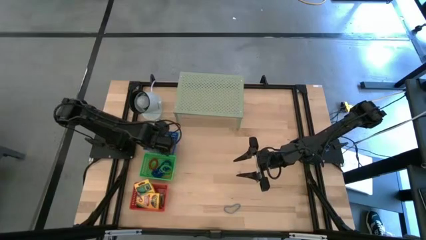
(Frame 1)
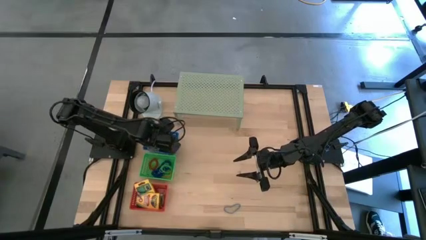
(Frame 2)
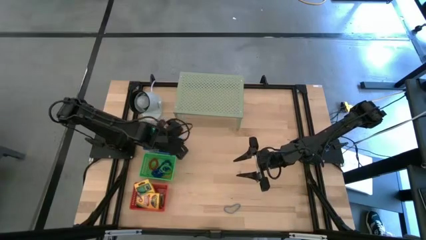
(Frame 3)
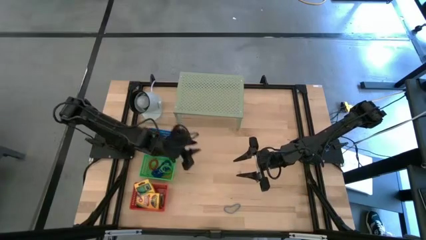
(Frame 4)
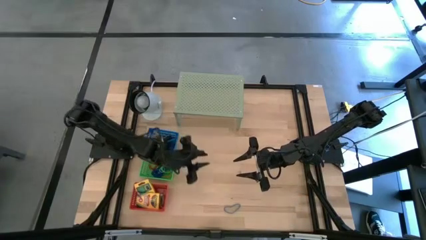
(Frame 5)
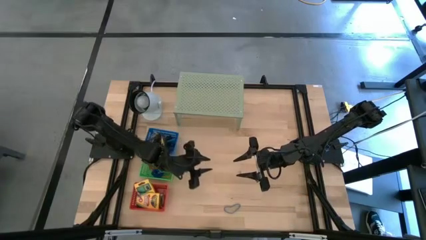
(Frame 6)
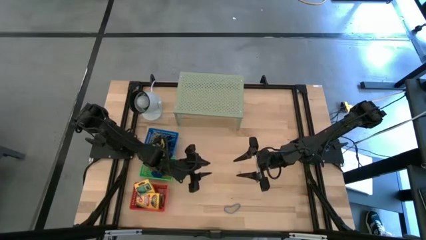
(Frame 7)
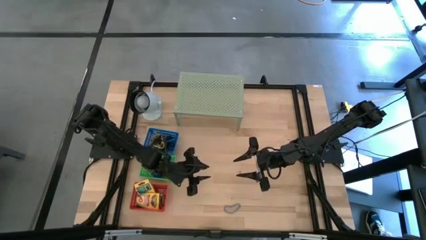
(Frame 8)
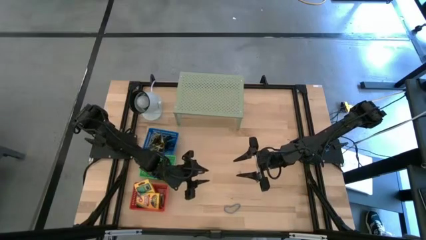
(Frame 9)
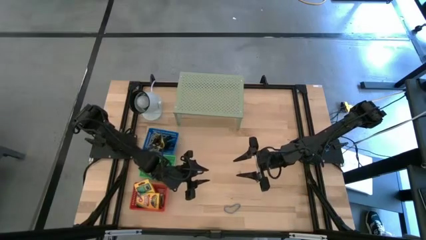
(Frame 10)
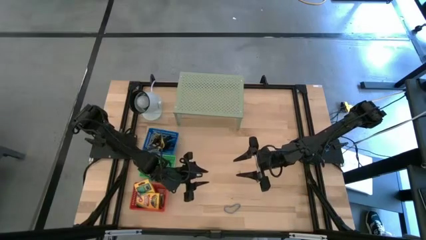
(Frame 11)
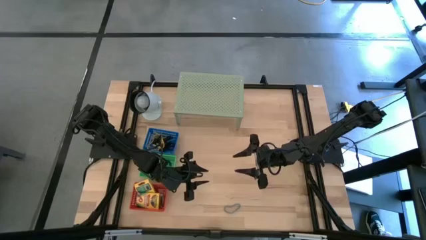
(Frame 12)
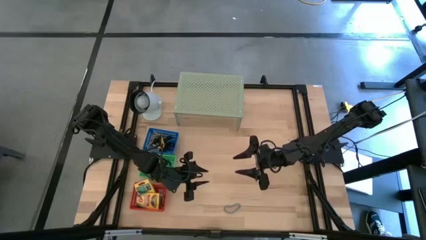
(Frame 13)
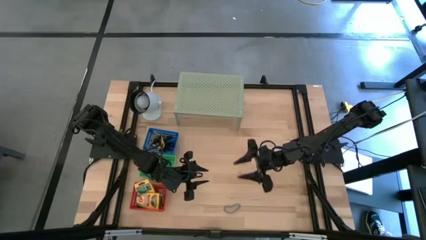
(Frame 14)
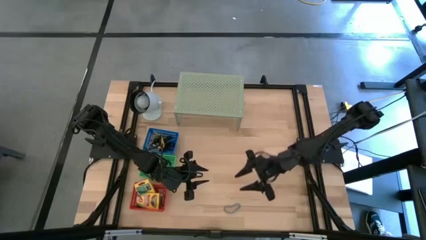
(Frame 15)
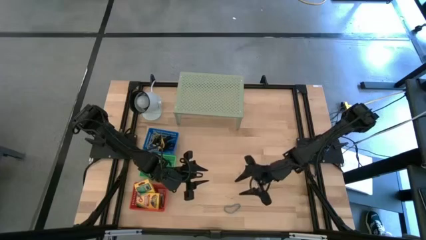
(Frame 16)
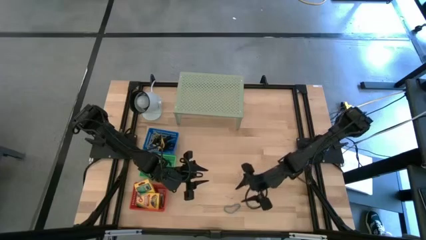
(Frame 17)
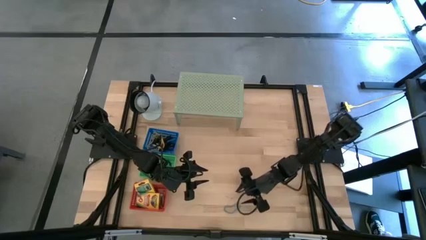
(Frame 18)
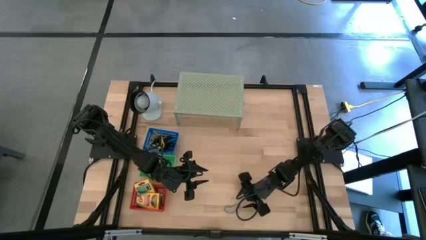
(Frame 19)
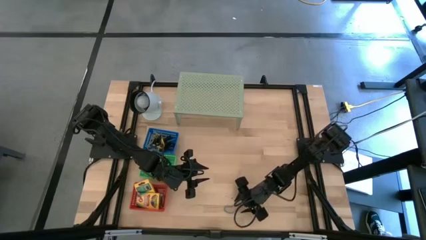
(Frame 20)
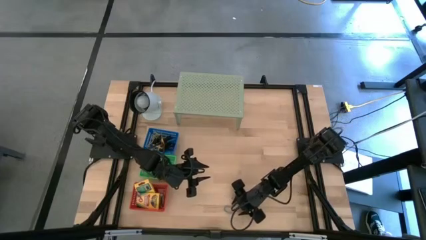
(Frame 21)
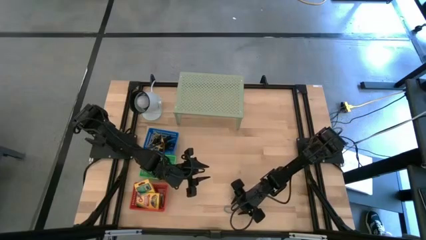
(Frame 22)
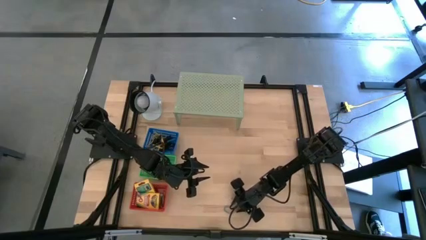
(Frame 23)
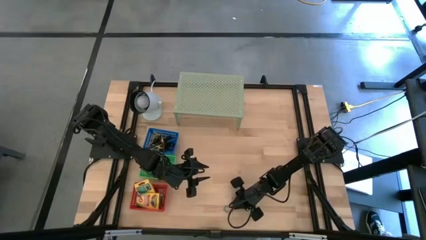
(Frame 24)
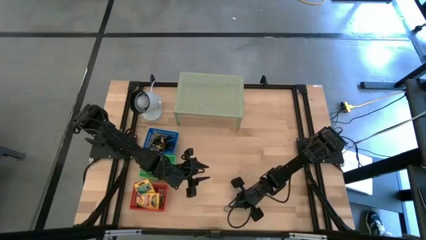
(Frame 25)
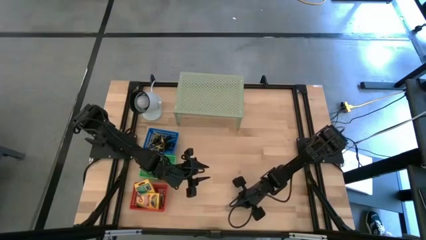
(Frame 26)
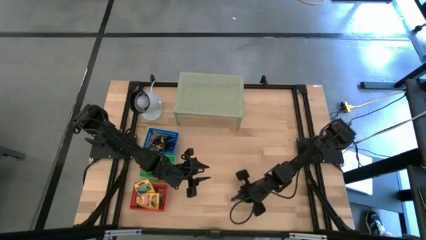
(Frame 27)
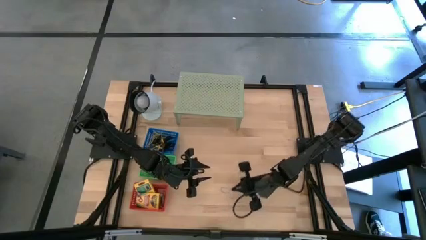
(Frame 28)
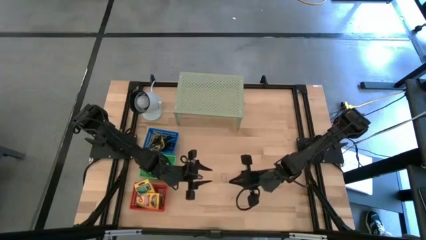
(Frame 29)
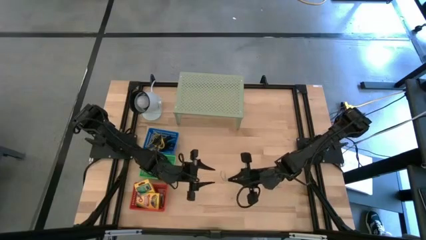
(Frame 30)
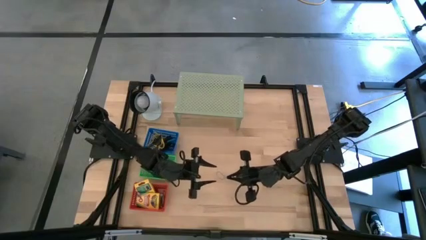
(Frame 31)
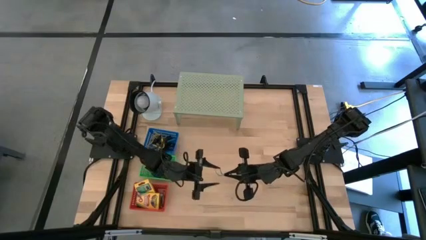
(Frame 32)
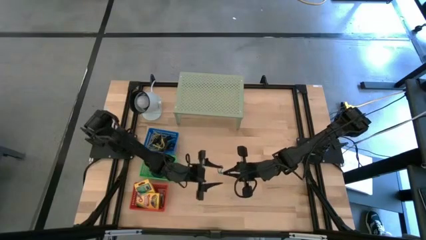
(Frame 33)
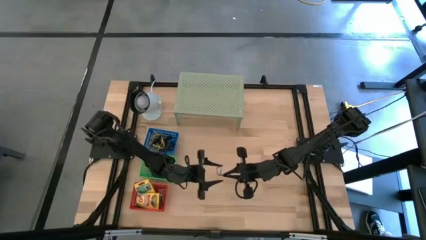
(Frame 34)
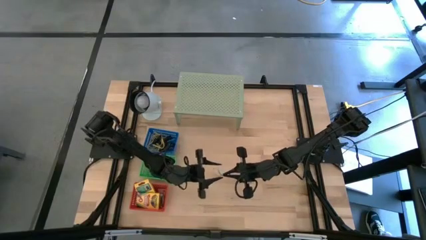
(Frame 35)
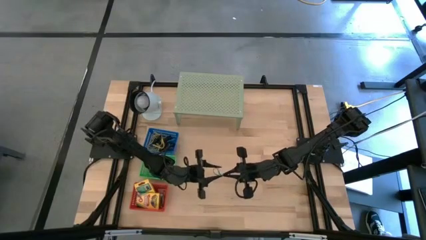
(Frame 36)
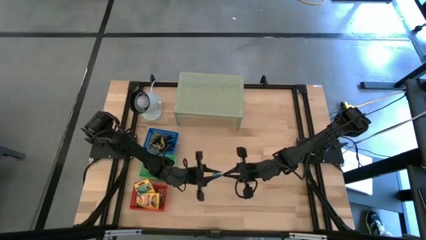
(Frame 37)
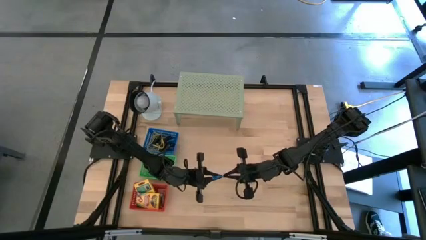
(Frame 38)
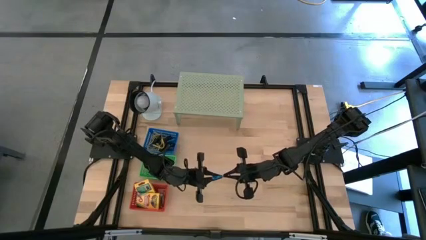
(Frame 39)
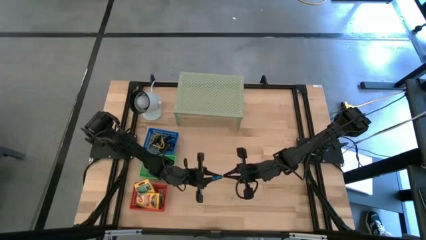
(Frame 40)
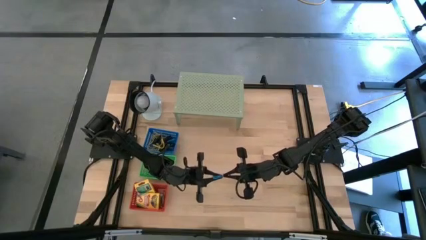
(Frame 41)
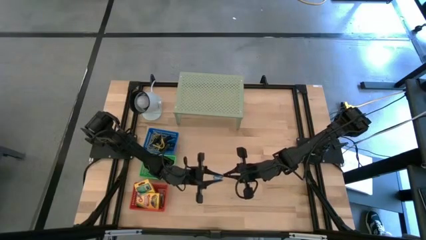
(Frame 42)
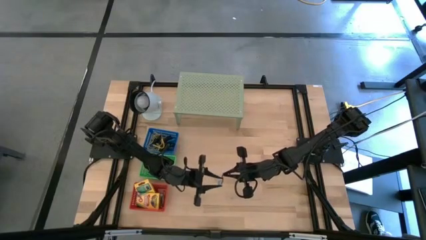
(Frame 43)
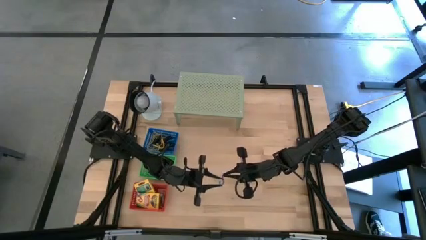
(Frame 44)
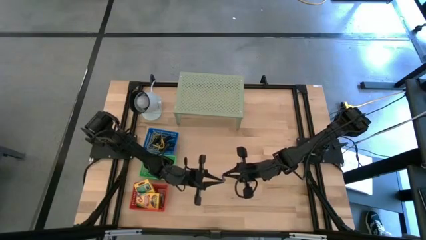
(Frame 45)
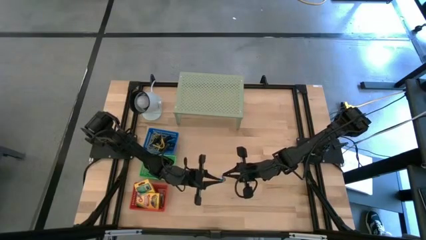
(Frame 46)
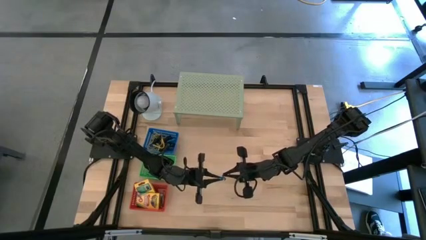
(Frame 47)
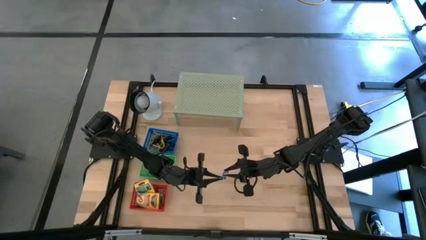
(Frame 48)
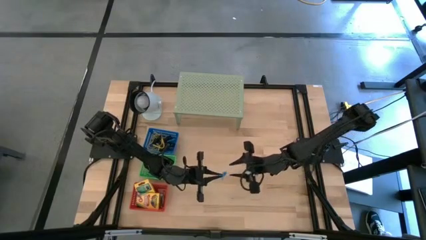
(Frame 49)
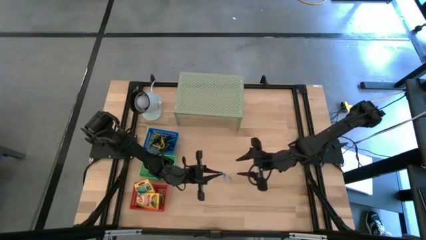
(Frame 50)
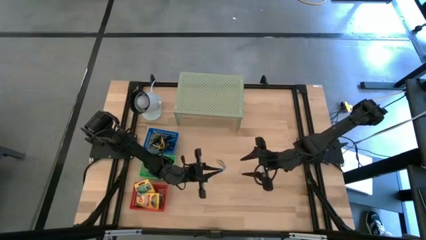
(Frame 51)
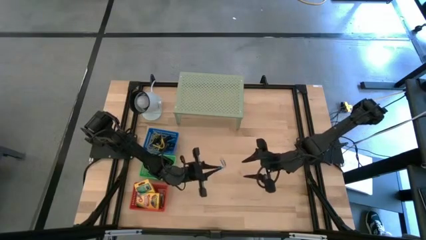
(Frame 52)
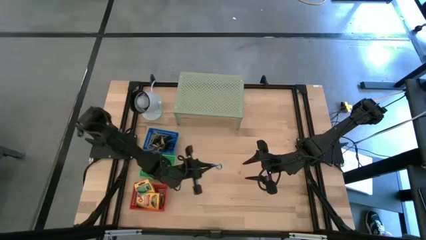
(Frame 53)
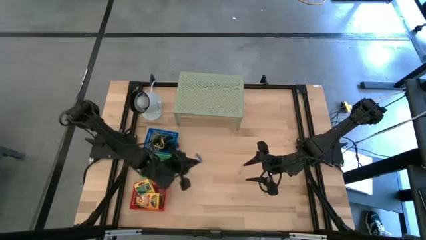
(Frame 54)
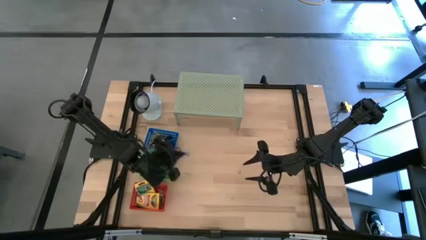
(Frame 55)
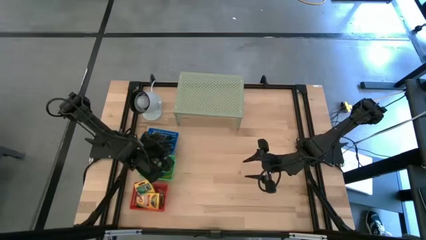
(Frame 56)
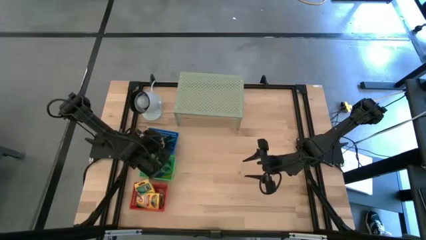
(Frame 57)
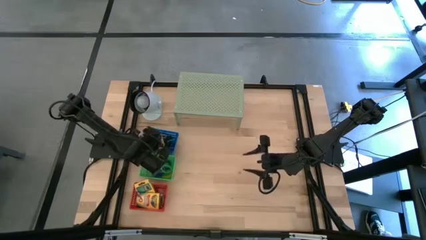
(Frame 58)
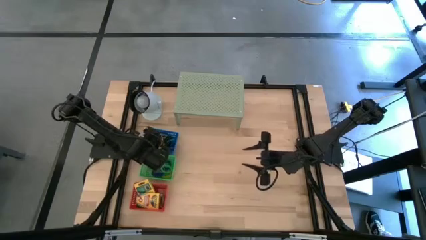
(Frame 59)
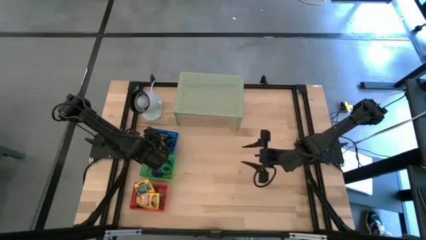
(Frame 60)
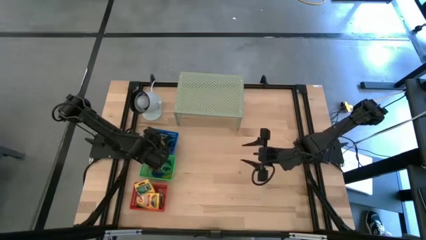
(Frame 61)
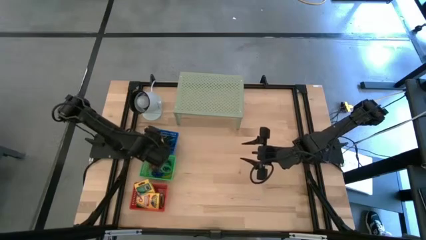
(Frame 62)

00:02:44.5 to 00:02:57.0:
Task: Pick & Place Office Desk Supplies
Put the blue rubber band into the blue bin

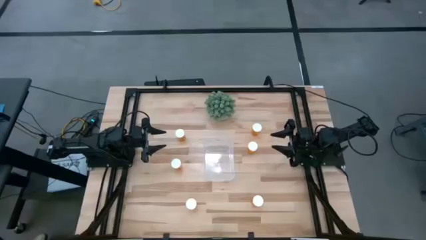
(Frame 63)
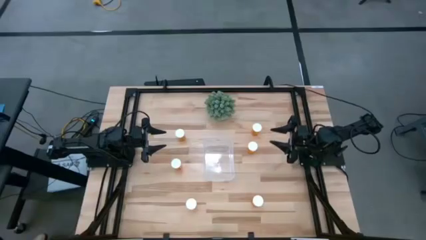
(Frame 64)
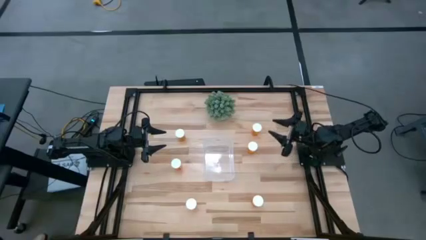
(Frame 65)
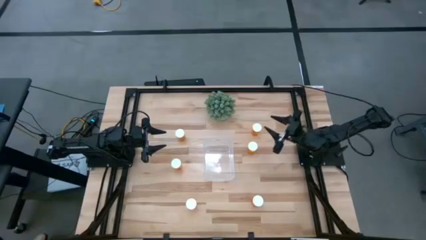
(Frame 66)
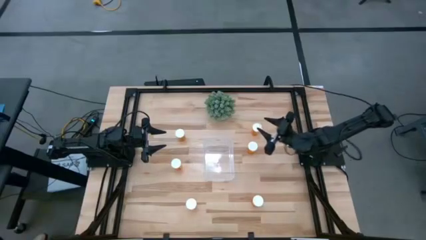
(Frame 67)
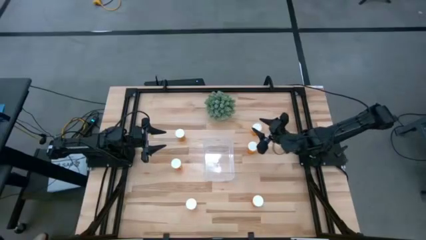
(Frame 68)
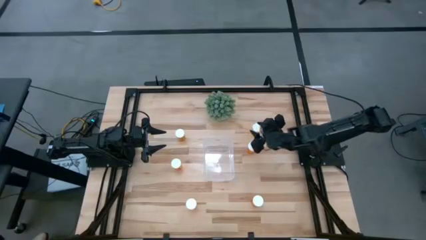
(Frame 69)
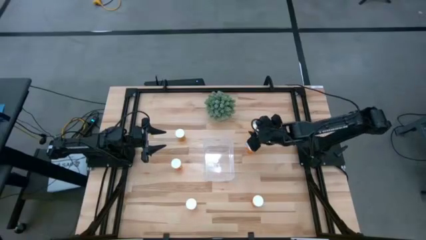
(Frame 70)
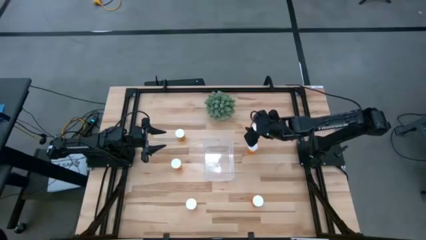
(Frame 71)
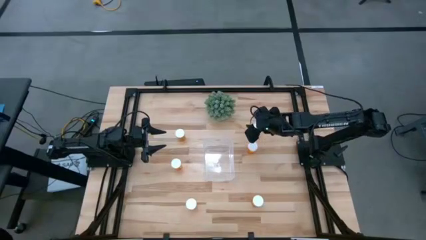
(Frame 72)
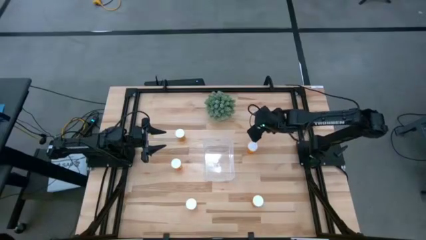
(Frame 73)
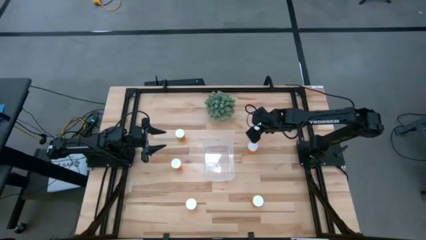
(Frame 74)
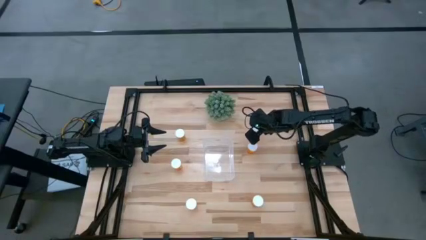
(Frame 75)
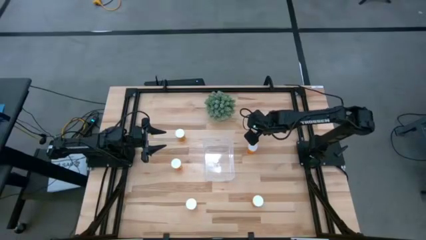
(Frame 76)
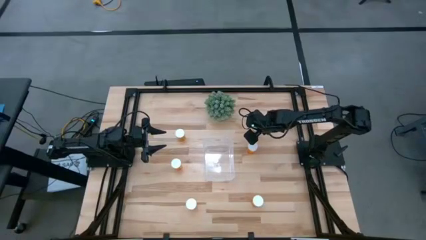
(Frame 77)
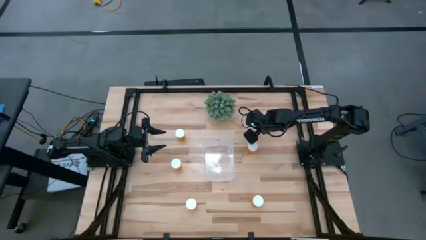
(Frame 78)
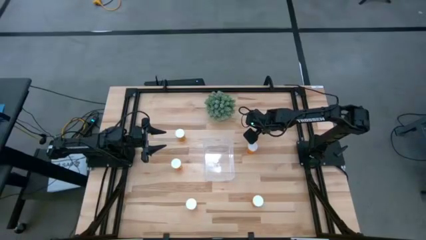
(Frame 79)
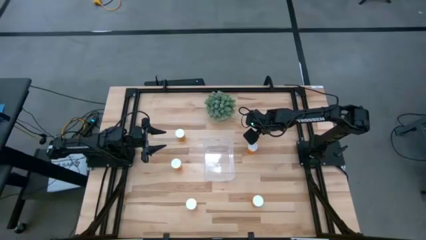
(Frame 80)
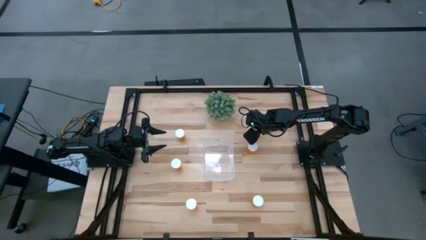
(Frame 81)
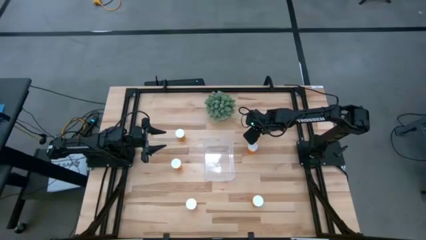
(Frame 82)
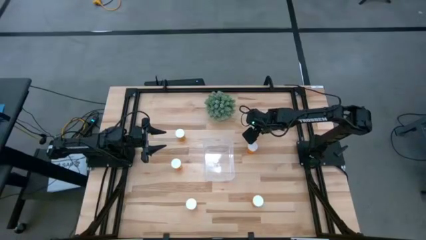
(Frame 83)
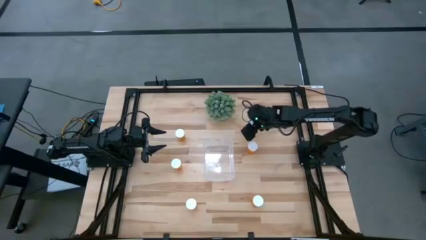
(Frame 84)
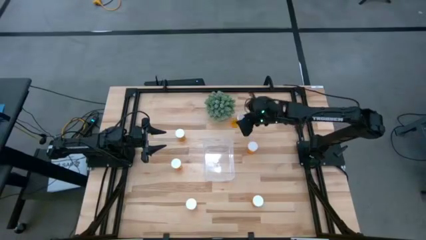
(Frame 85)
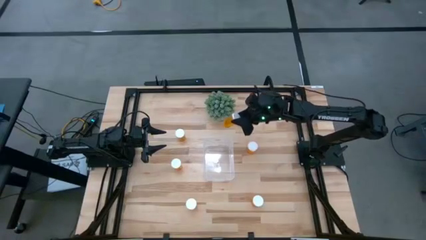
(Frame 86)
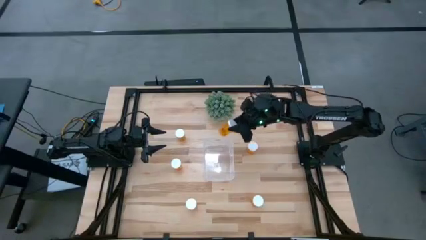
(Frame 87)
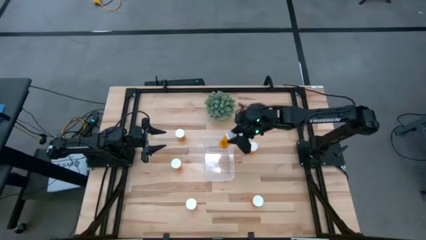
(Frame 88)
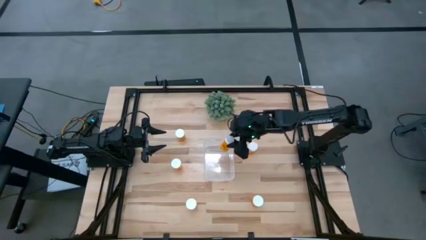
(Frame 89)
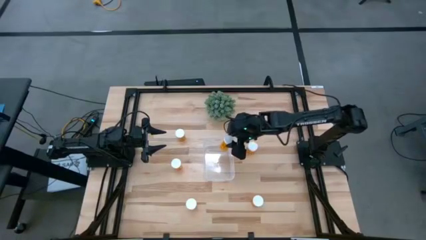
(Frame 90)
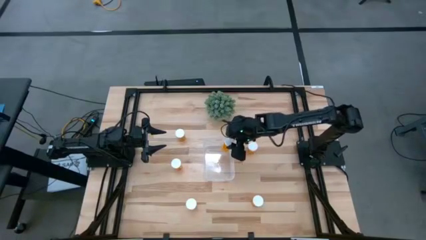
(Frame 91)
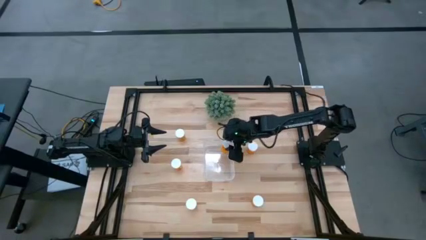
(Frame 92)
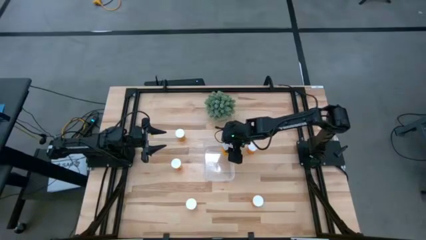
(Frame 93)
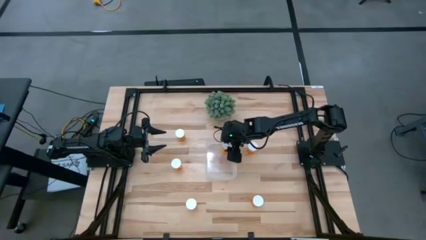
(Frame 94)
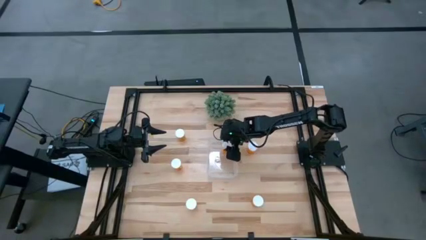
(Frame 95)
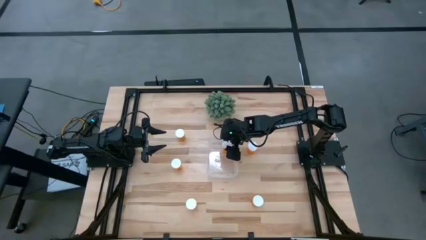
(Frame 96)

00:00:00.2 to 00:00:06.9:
Task: Pick and place pill bottles into a basket
Put the orange pill bottle into the transparent bin
